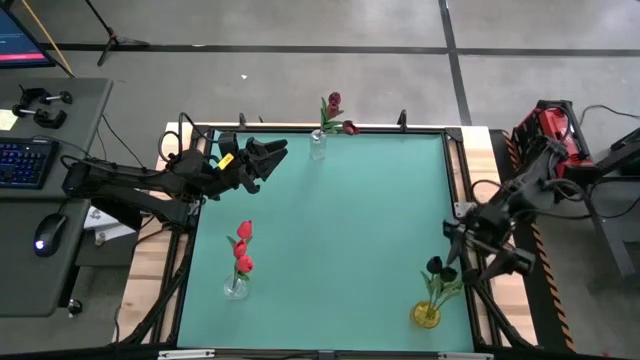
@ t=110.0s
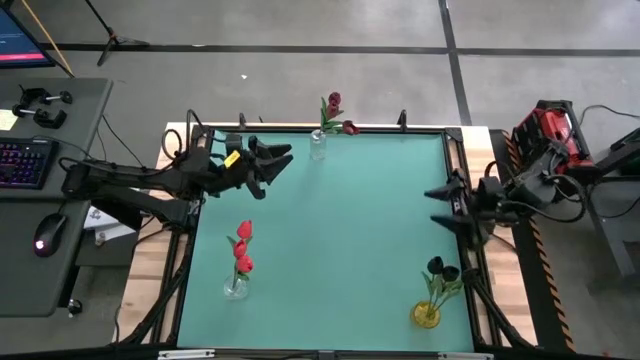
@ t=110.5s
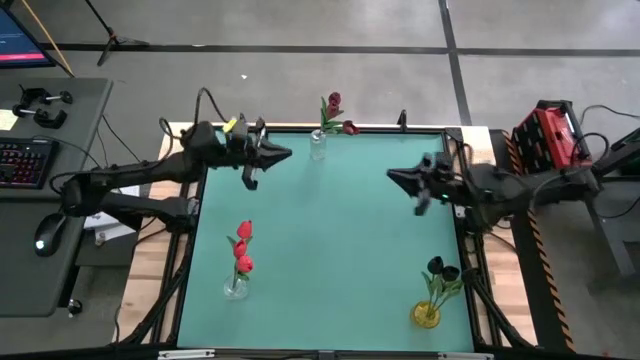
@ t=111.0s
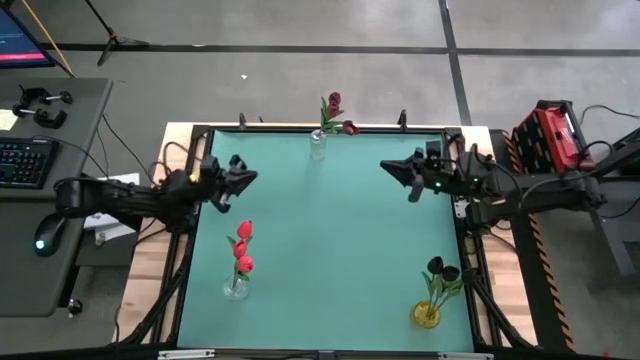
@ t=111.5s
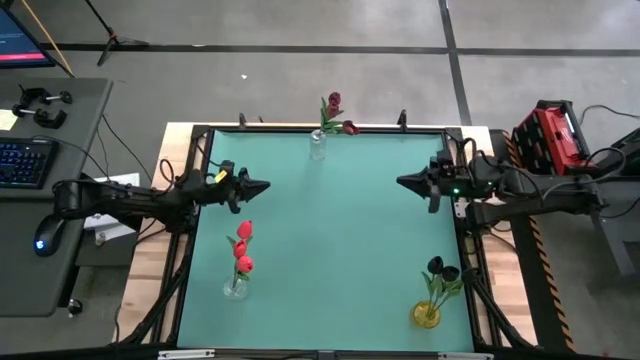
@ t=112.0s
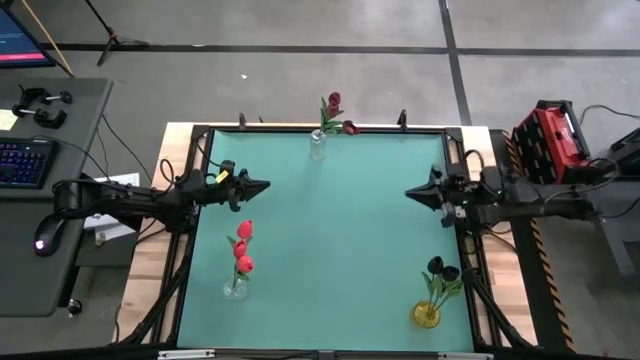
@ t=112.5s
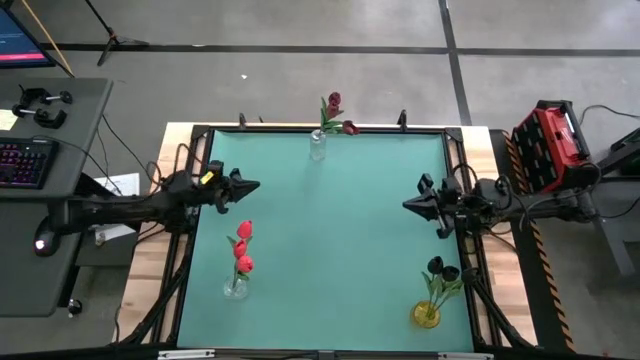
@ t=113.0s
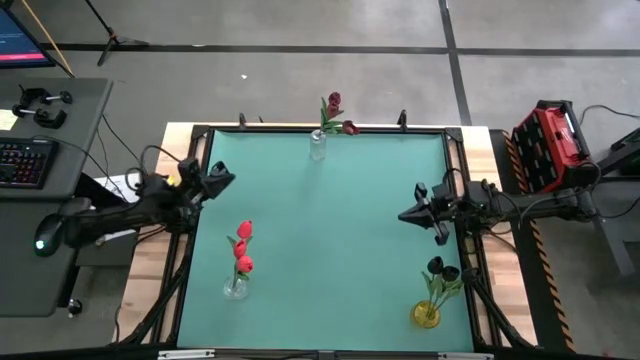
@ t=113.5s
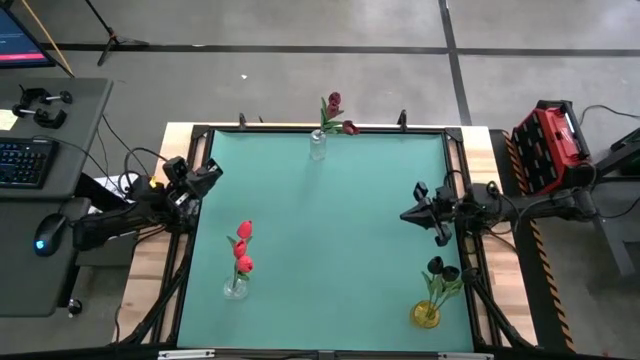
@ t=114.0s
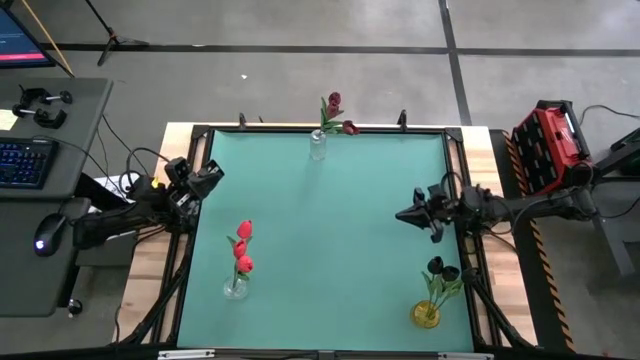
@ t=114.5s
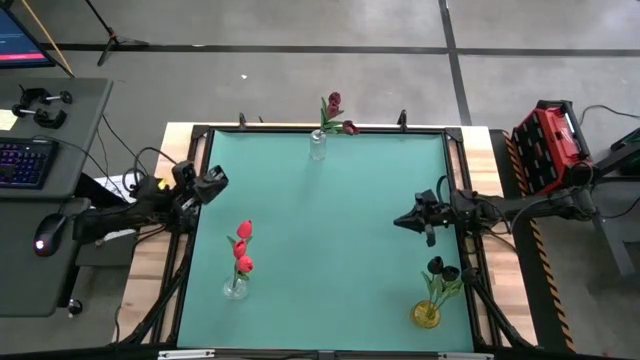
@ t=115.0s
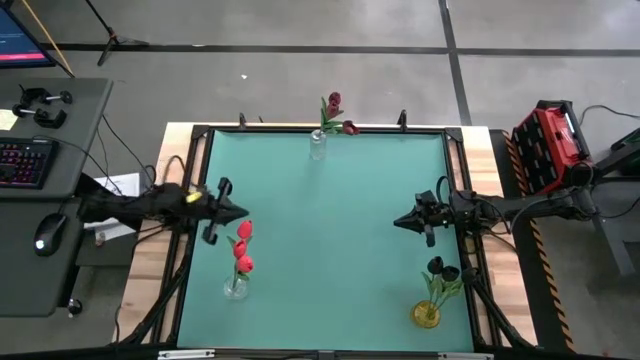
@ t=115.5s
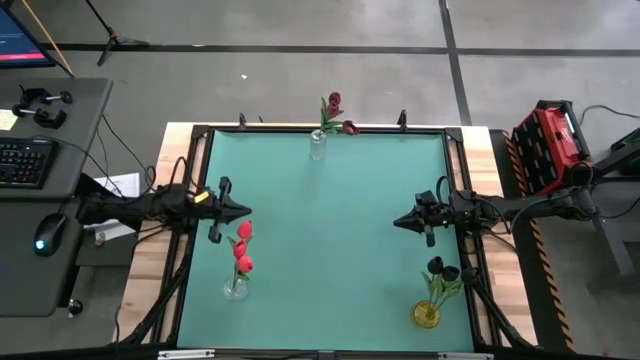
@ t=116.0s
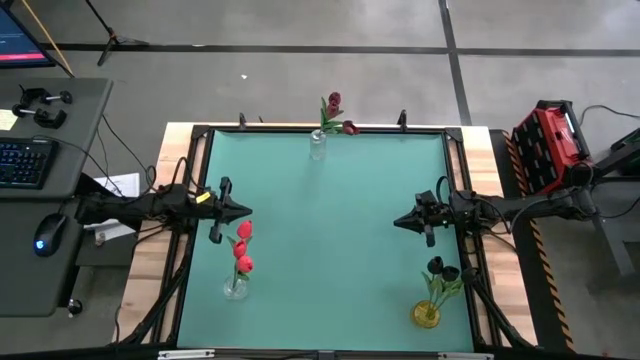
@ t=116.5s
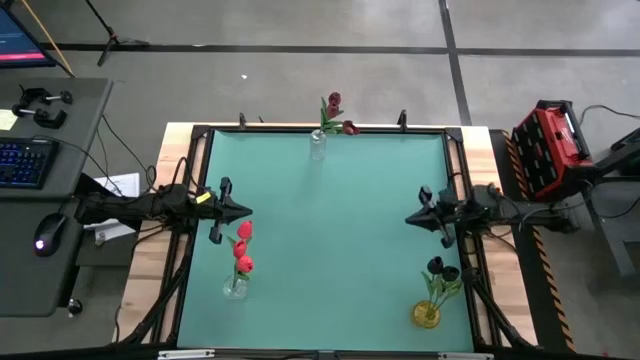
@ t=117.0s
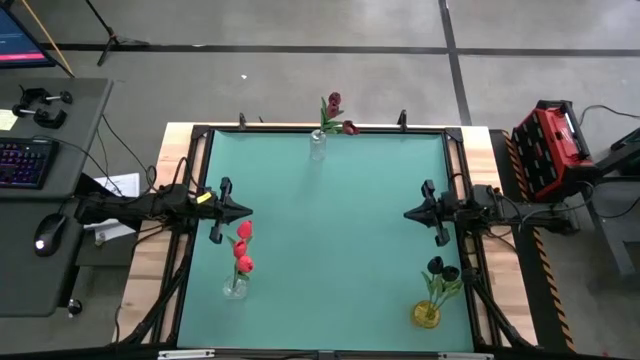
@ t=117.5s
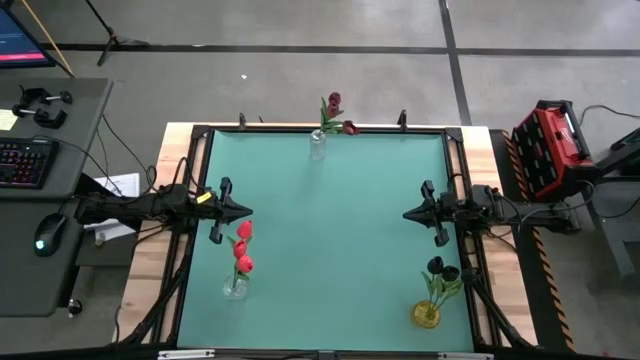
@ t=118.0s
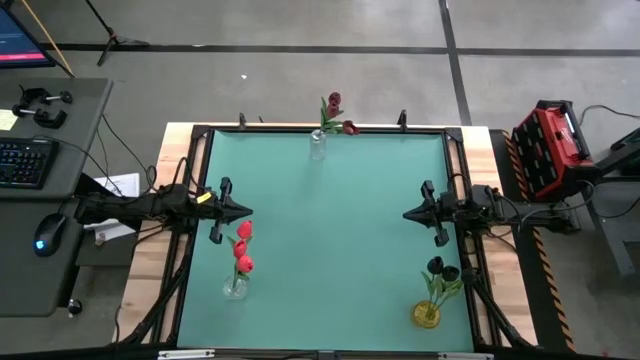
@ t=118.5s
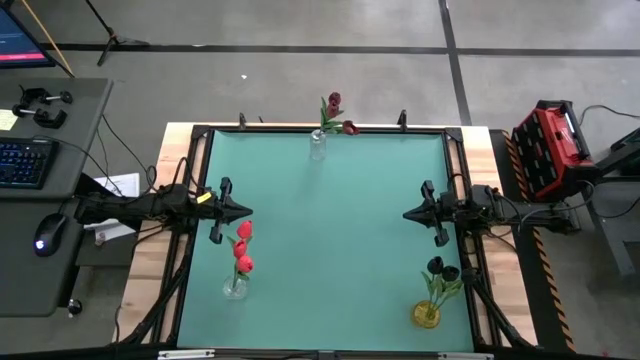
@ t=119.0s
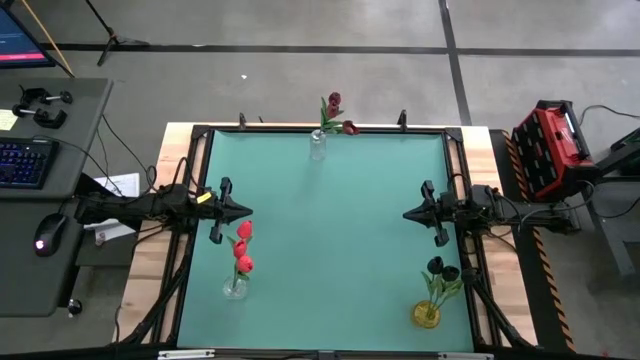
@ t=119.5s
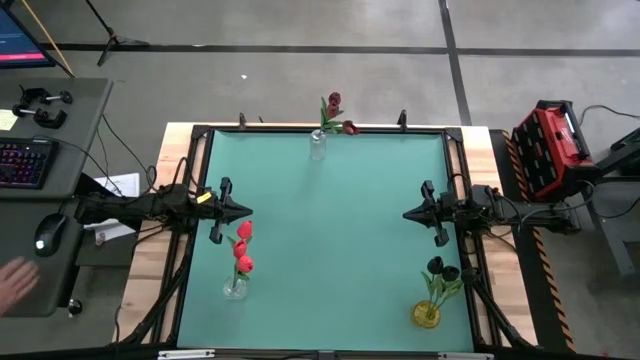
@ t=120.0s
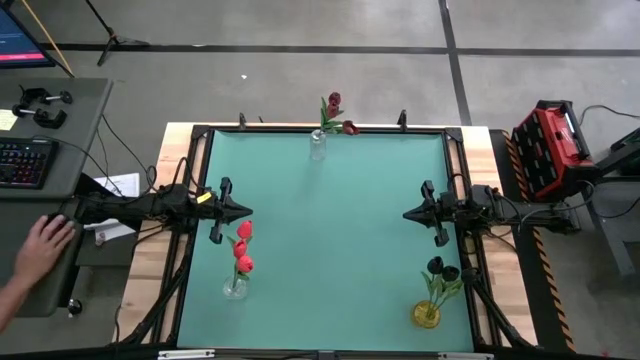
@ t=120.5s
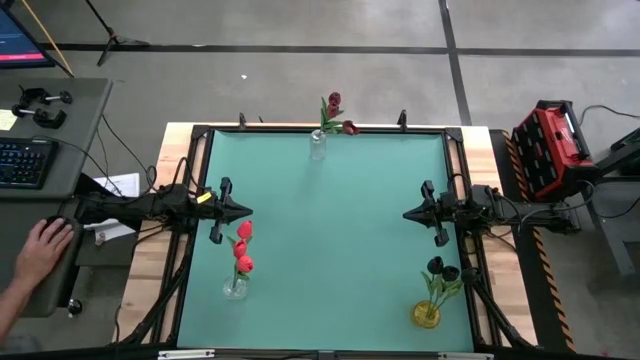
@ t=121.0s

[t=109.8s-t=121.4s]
Task: Sort flowers into vase by color
Return to Home Position

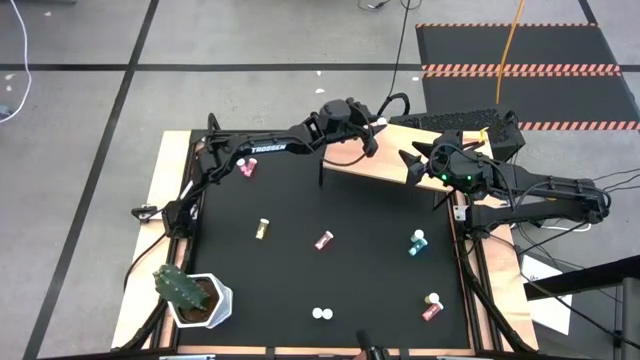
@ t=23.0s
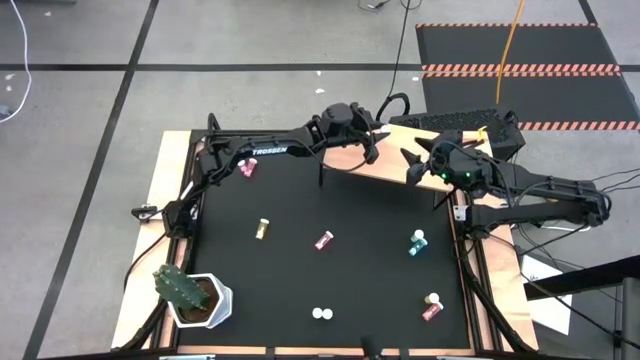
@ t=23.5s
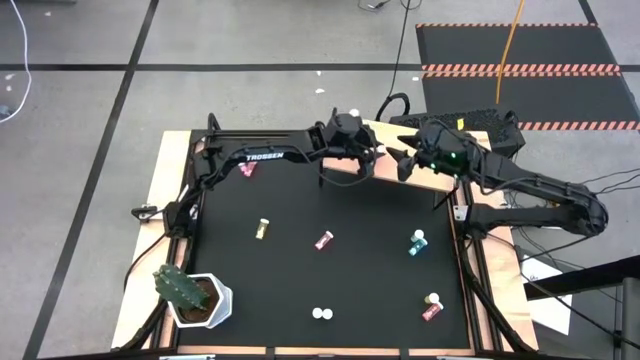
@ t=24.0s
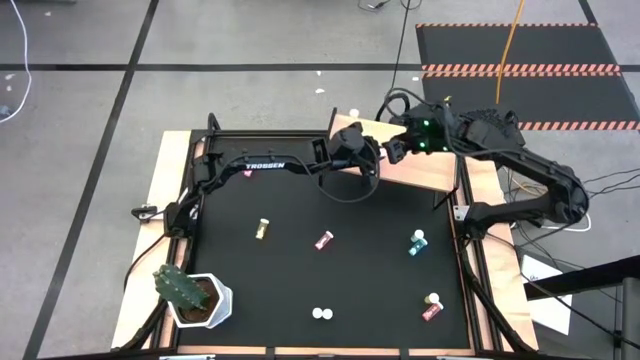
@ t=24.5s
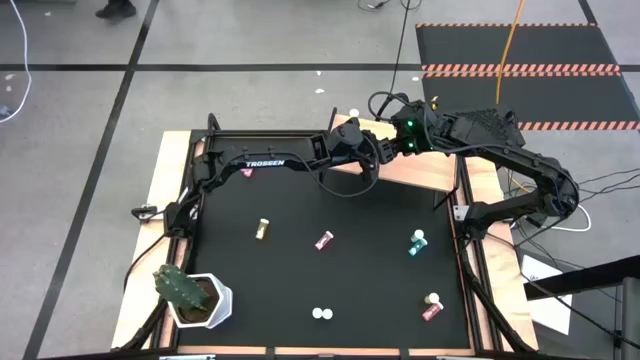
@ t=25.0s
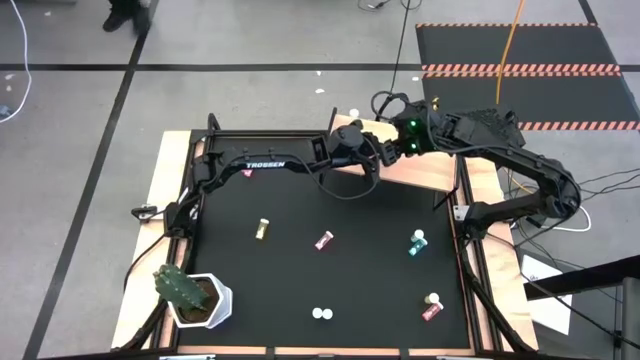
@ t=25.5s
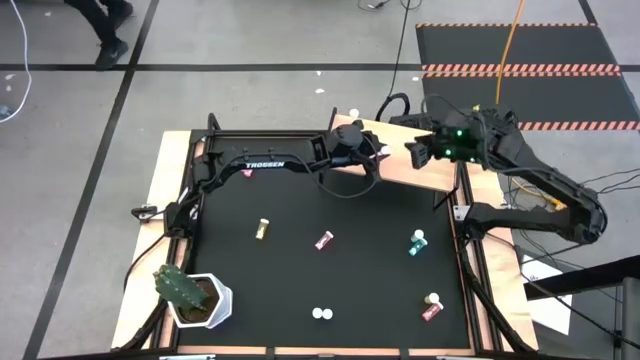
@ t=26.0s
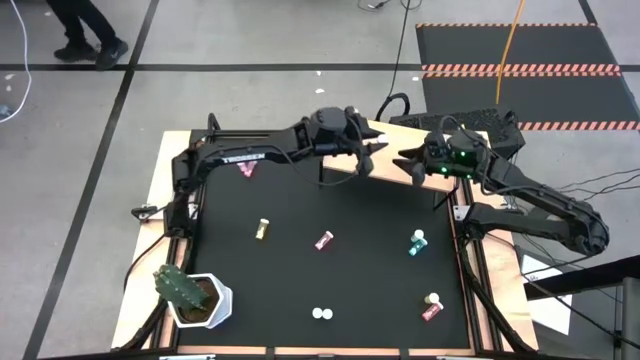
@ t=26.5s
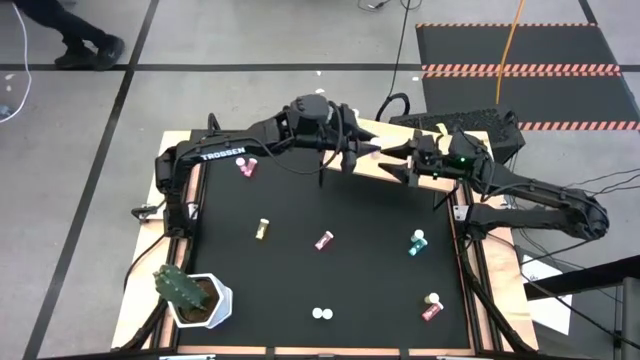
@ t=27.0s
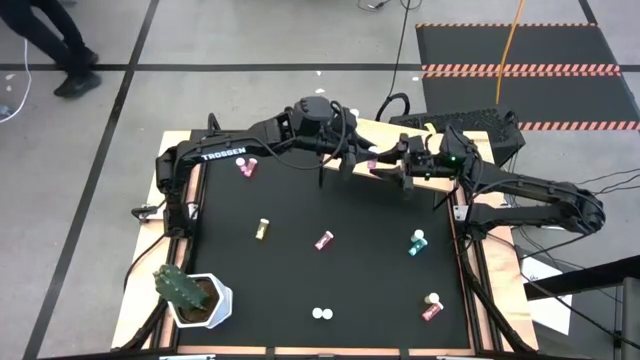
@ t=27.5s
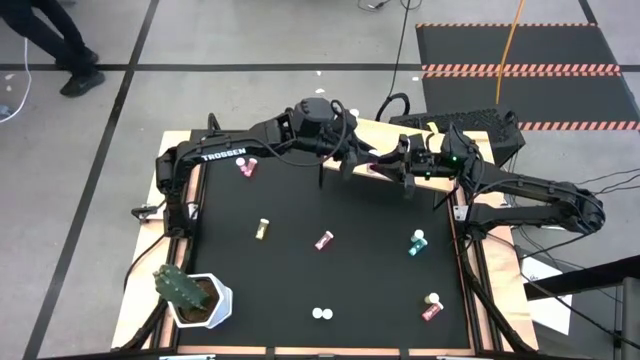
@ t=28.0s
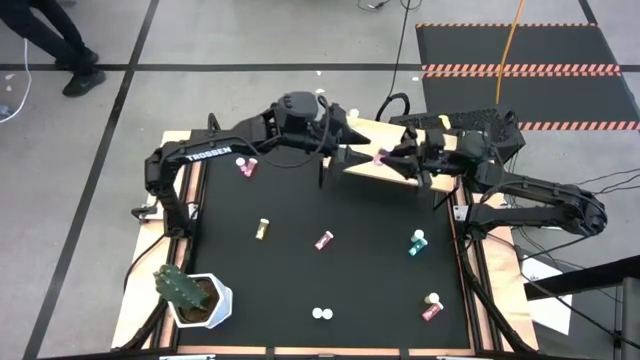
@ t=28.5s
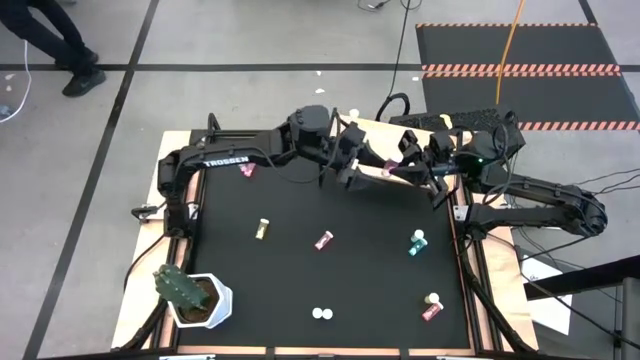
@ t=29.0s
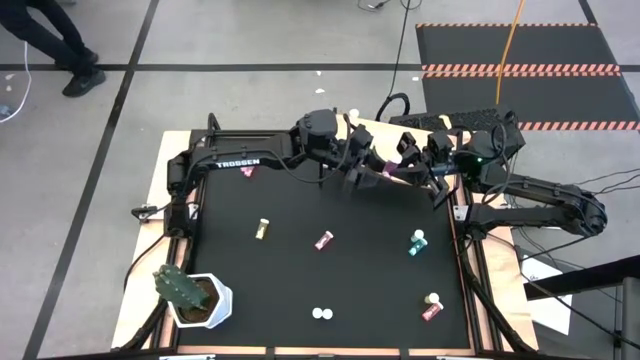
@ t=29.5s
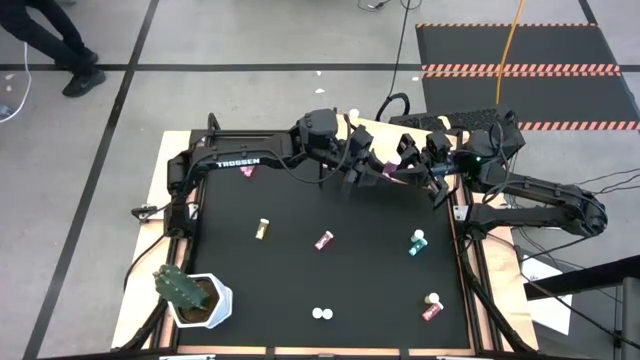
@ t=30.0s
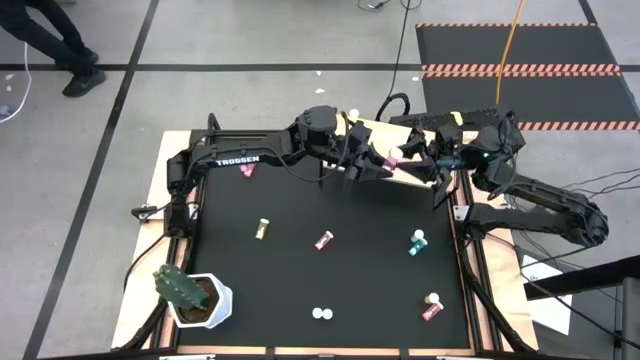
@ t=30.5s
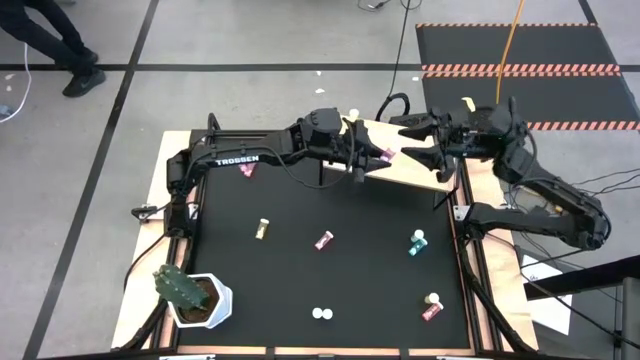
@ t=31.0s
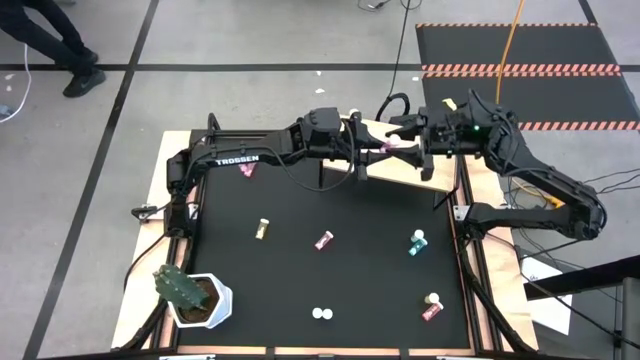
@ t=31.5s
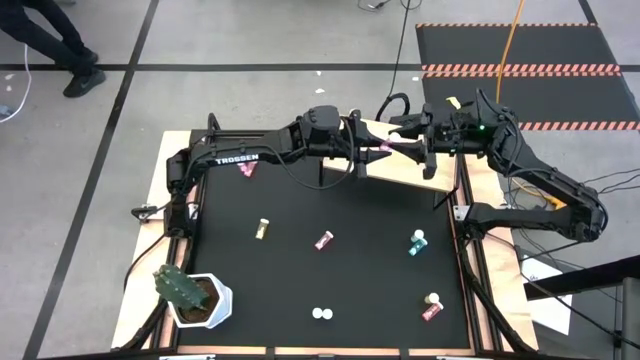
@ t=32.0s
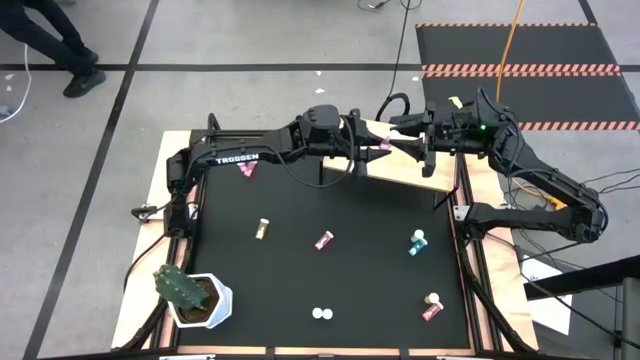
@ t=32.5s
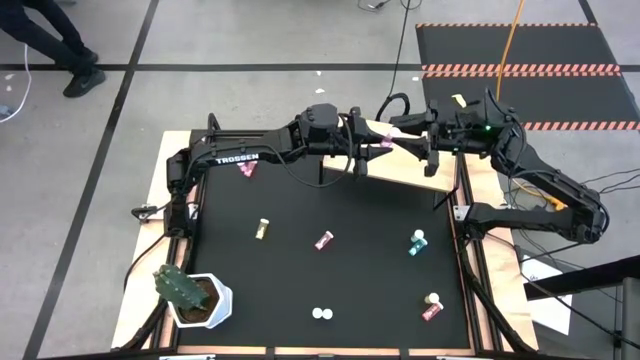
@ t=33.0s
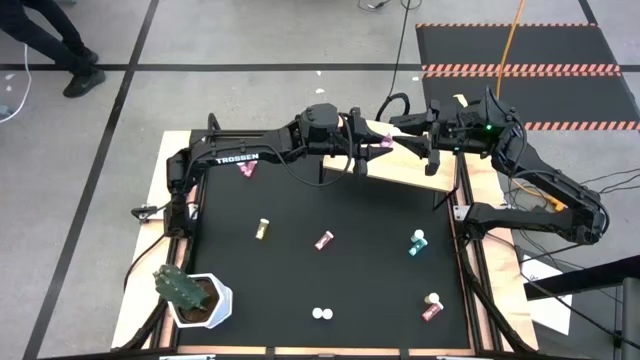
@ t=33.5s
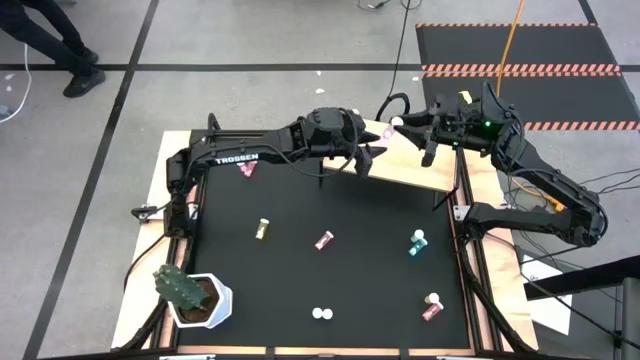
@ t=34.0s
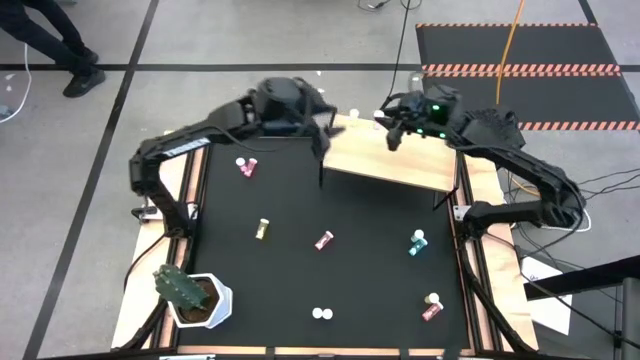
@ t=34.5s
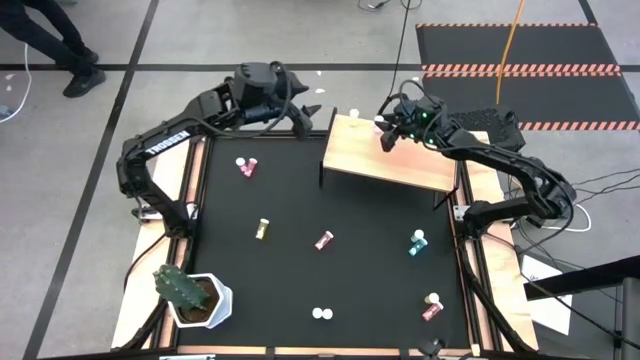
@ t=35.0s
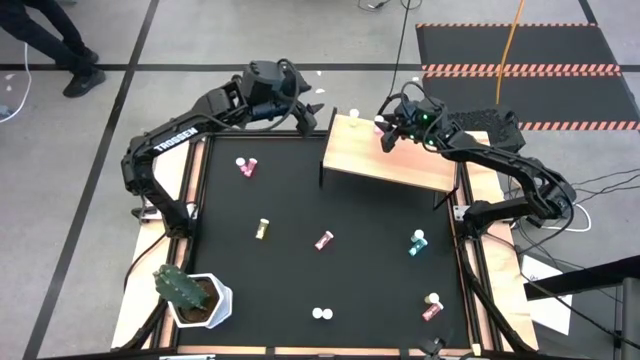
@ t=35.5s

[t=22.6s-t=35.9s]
Task: Pick and place medicine bottles onto shelf by color
Put the middle left pink pill bottle on the shelf
